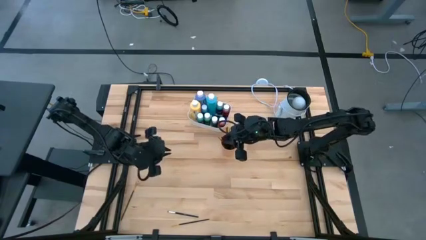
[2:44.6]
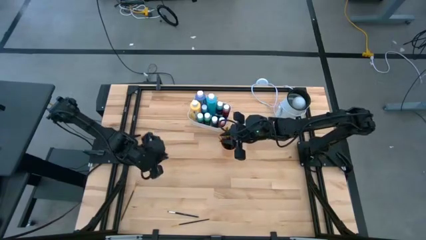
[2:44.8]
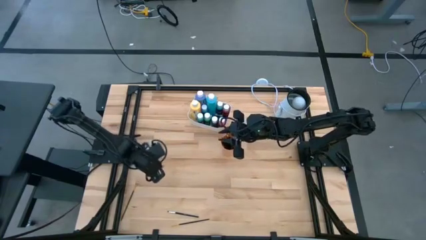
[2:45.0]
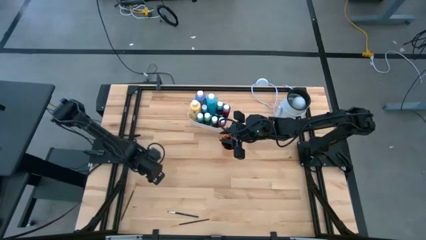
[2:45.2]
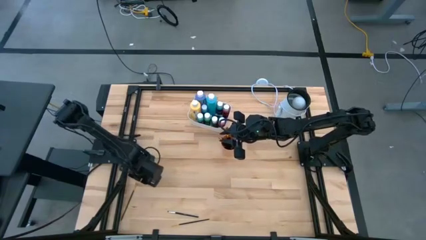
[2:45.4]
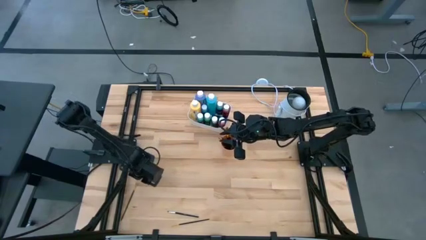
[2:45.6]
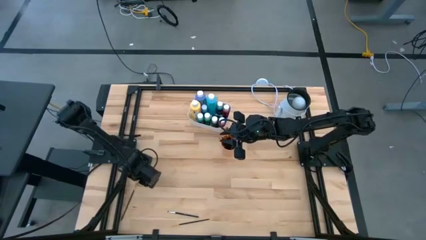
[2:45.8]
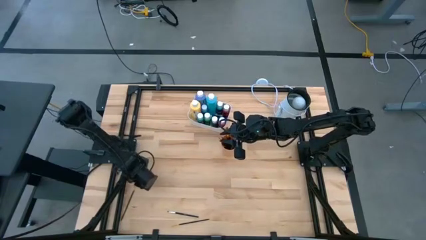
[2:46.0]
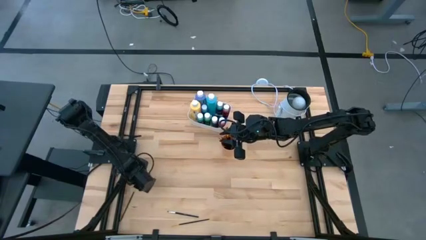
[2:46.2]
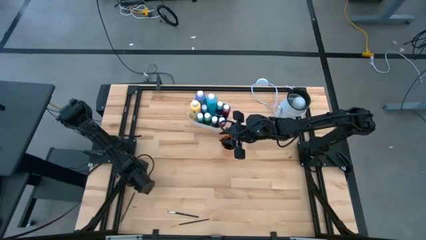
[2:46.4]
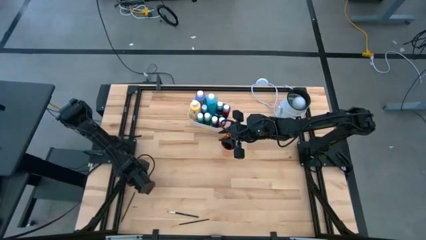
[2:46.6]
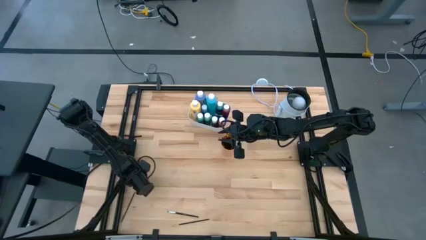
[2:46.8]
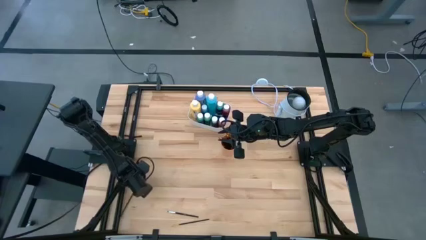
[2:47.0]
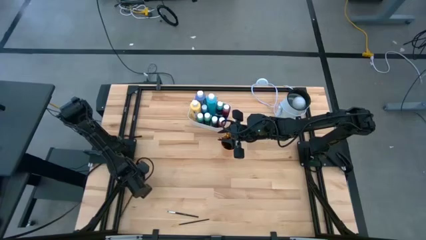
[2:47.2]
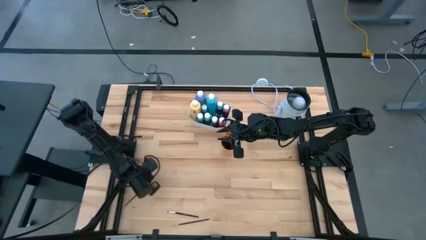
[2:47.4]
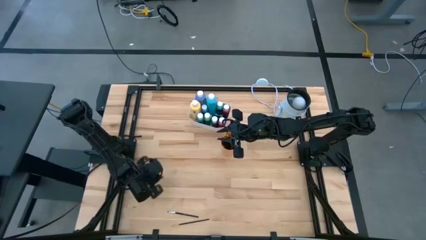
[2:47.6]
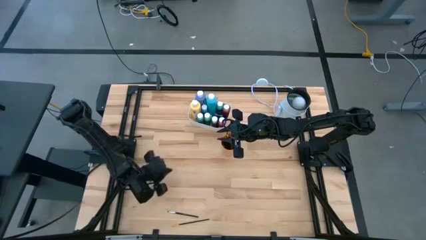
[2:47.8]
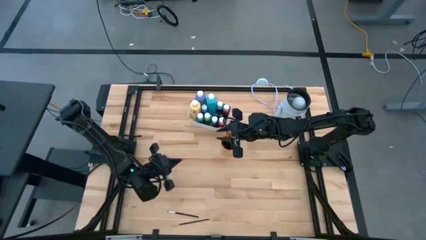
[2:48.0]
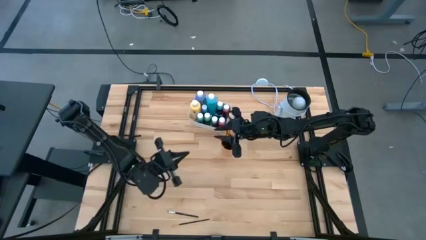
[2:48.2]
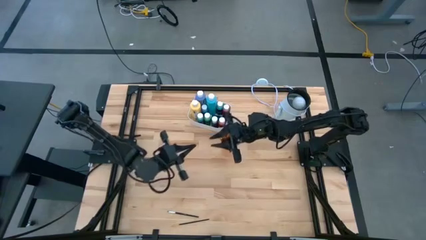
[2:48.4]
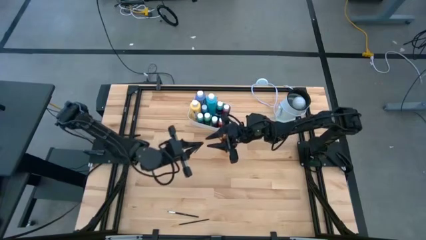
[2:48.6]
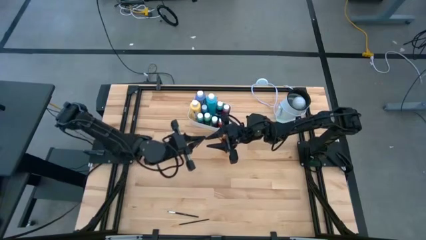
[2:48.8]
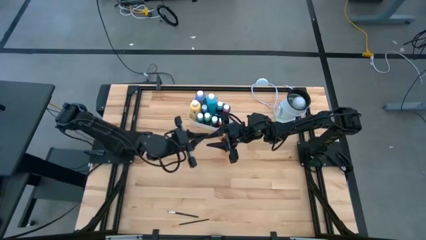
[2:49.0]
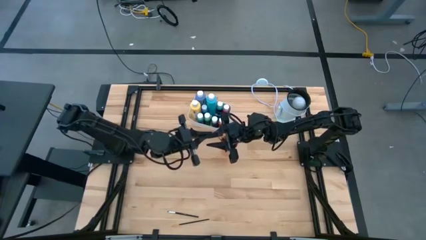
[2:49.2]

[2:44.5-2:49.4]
Task: Pick & Place Paint Supplies
Put the black paint brush into the orange cup

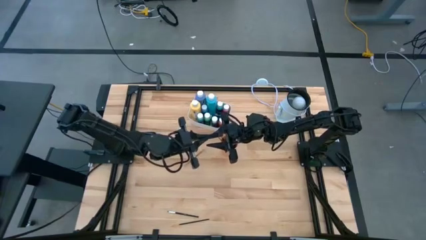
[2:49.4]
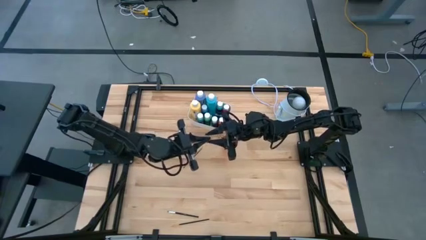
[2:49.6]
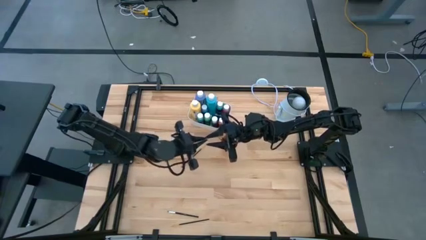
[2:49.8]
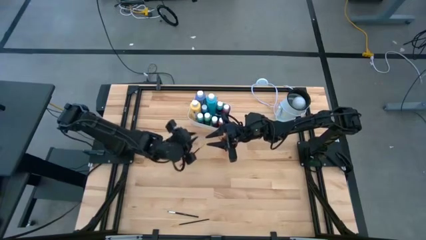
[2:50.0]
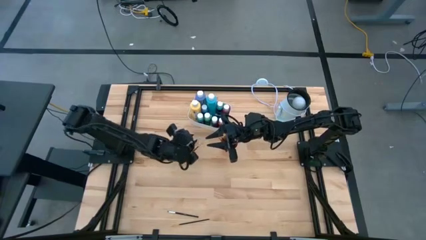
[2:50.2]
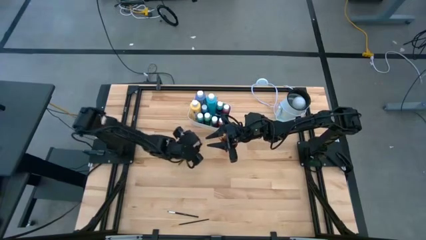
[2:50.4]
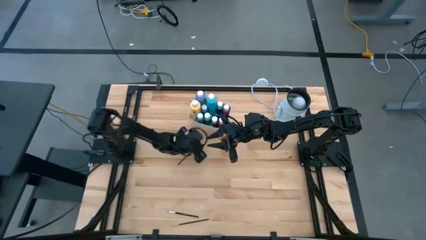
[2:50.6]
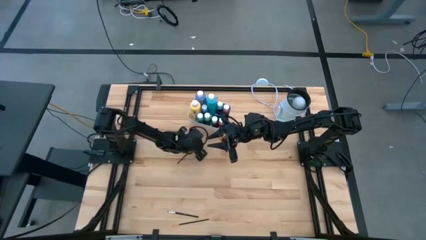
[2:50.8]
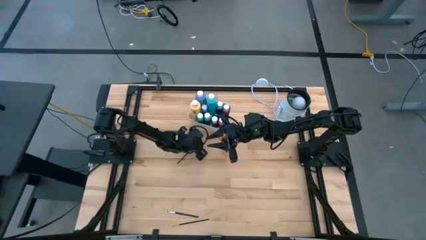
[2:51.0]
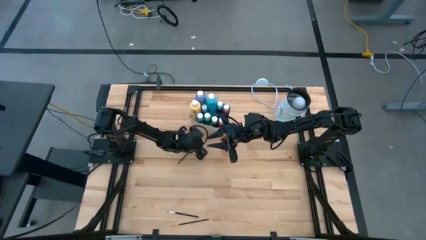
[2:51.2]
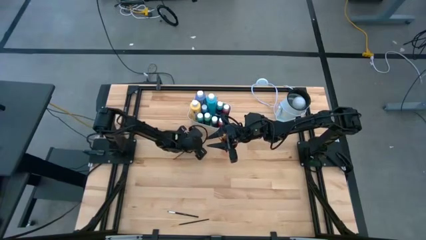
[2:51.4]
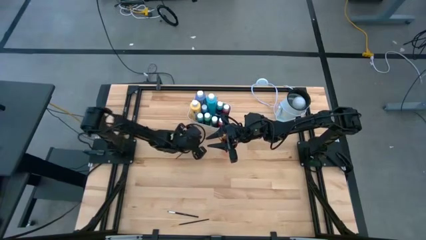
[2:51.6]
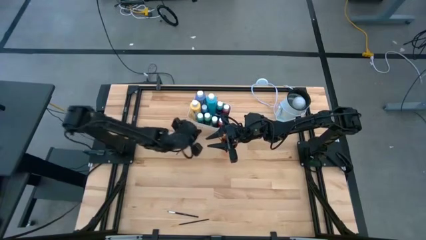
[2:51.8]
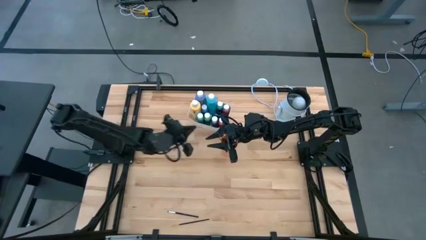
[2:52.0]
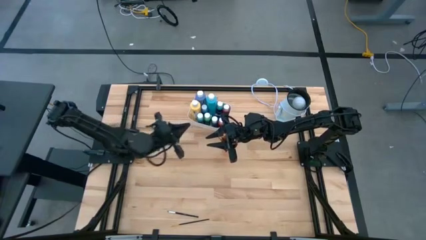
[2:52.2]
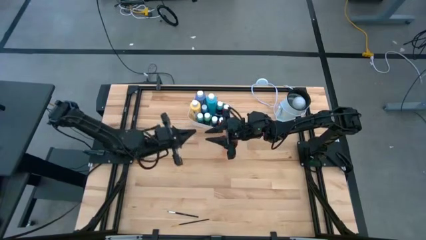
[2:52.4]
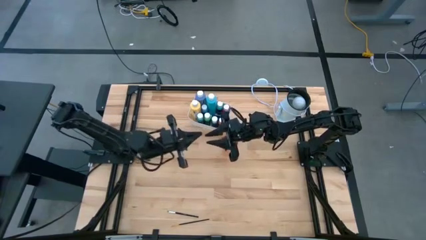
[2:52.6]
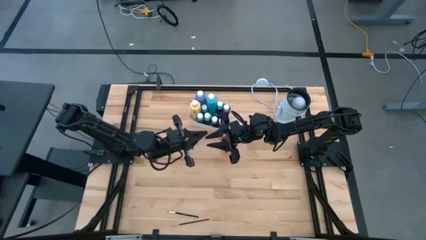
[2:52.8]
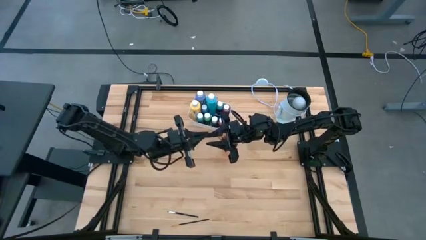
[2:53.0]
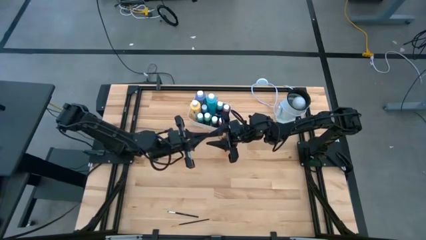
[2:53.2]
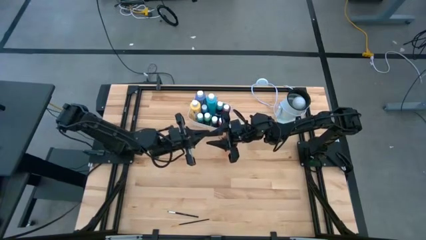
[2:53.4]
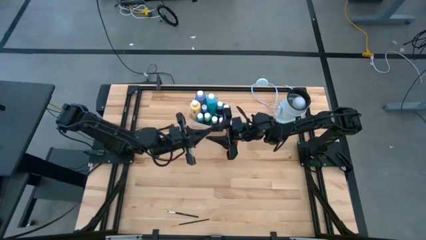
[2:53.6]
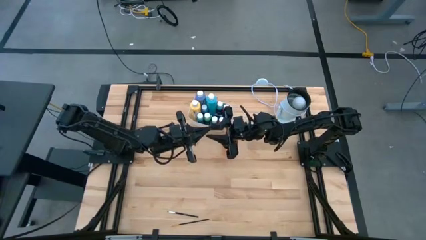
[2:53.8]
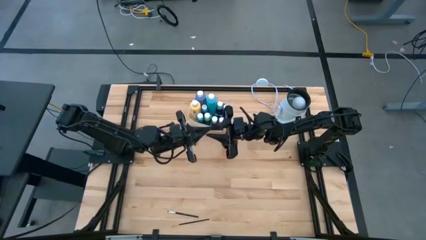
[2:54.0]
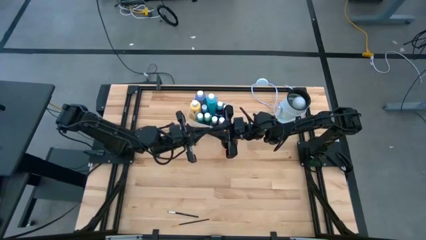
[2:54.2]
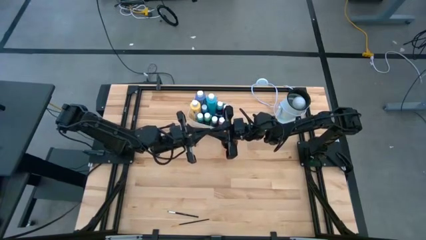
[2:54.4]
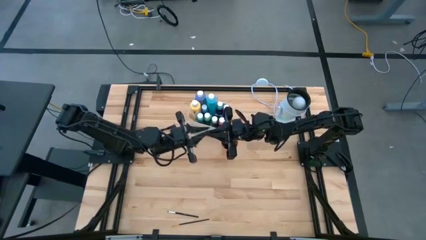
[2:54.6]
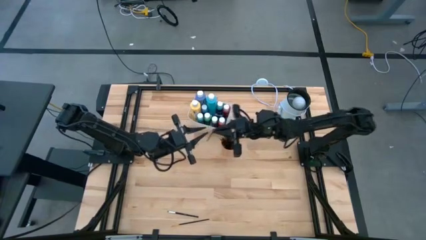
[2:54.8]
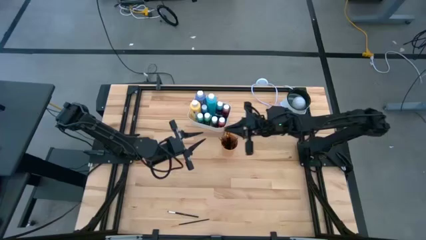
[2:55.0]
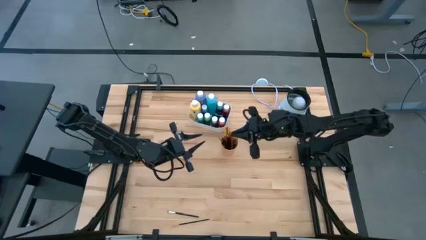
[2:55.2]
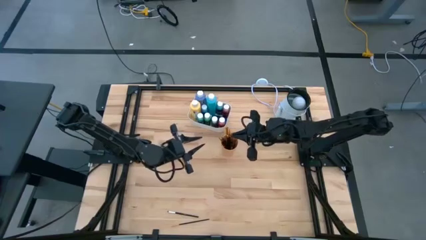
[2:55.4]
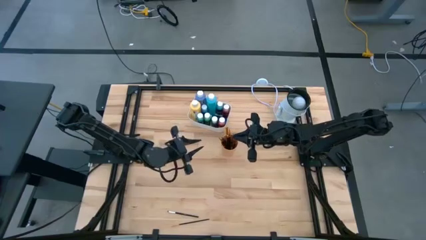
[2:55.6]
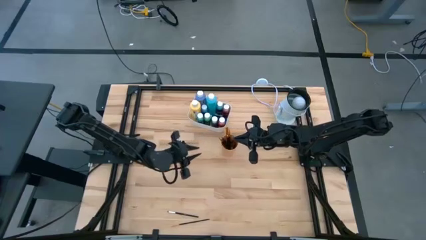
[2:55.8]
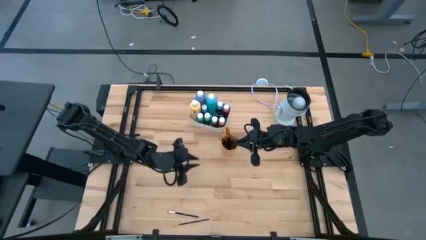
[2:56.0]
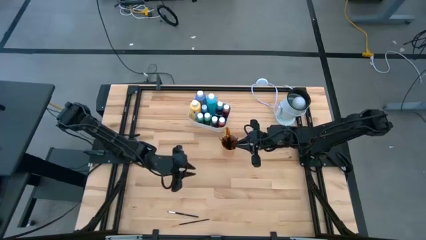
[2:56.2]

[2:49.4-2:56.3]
Put the black paint brush into the orange cup

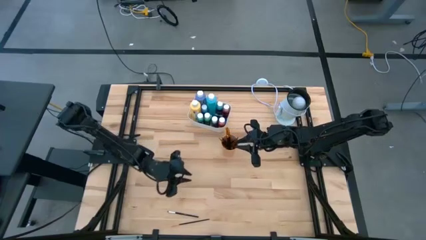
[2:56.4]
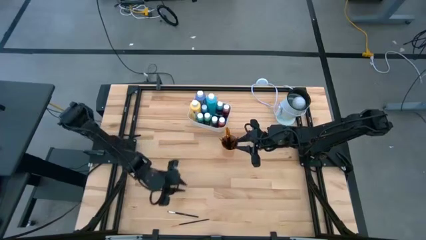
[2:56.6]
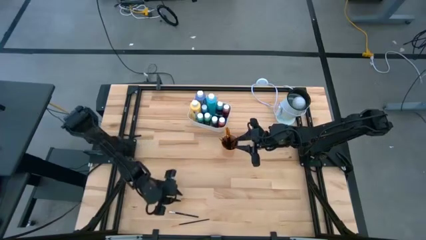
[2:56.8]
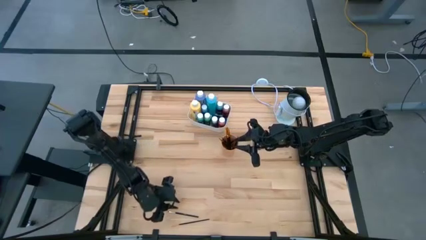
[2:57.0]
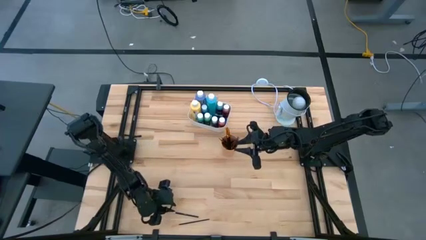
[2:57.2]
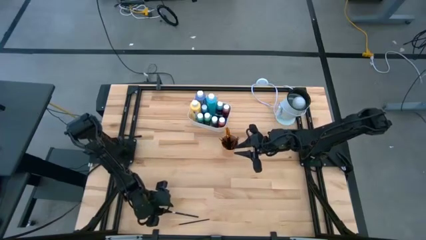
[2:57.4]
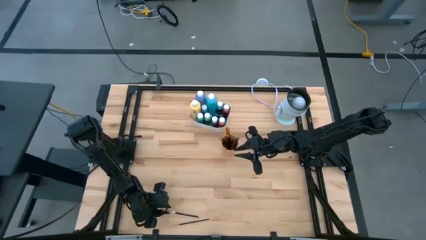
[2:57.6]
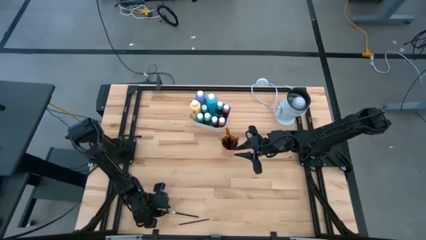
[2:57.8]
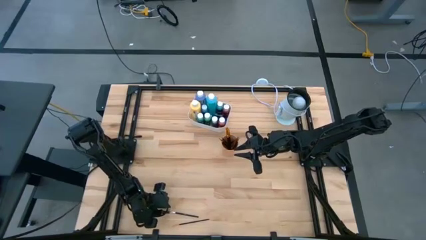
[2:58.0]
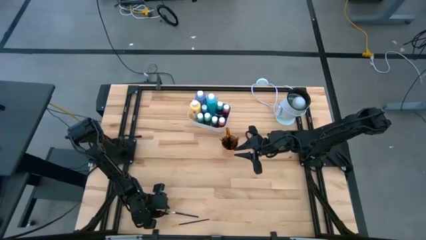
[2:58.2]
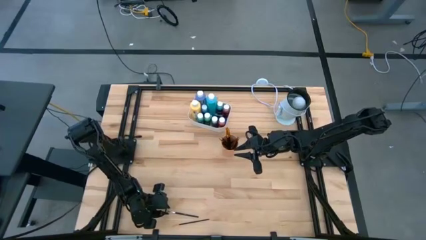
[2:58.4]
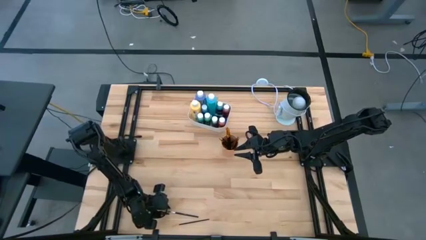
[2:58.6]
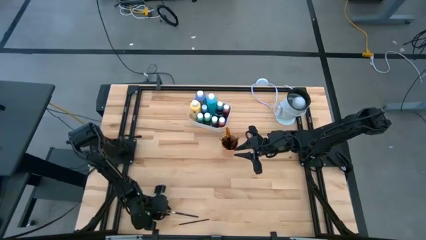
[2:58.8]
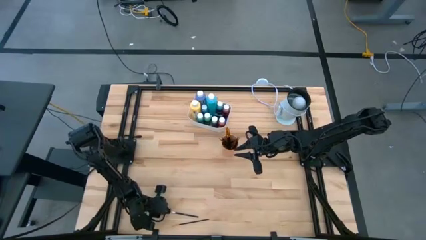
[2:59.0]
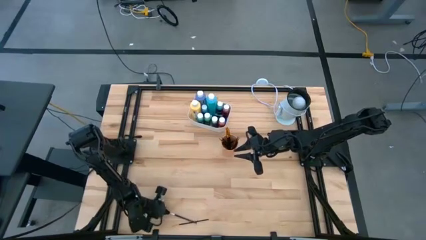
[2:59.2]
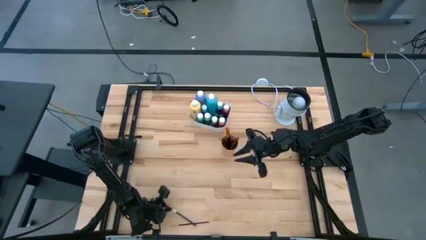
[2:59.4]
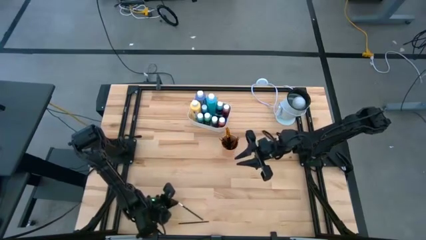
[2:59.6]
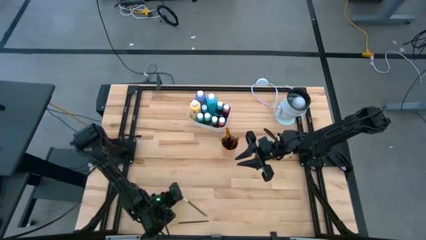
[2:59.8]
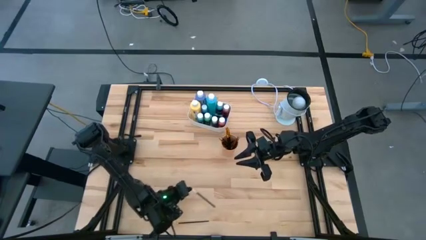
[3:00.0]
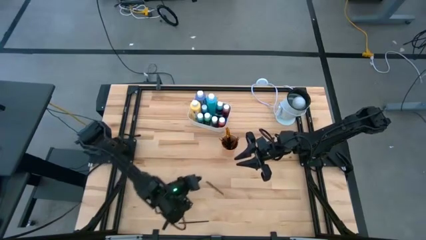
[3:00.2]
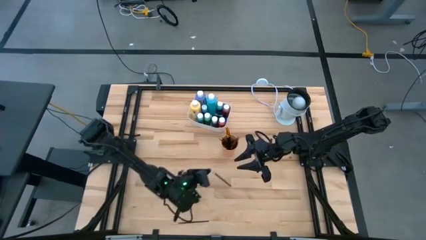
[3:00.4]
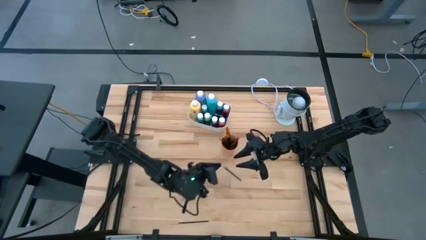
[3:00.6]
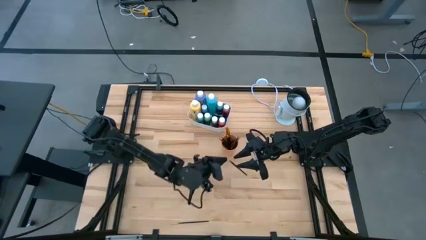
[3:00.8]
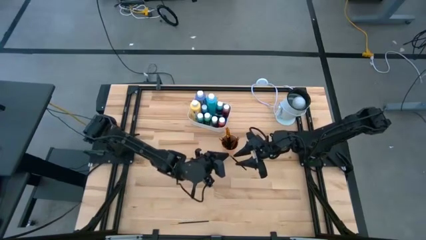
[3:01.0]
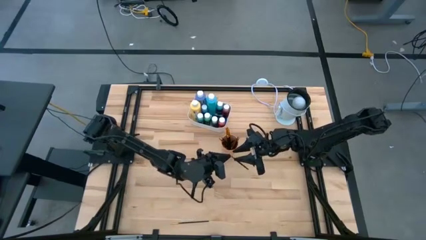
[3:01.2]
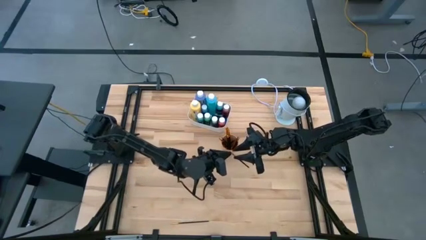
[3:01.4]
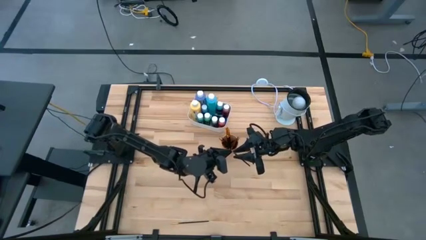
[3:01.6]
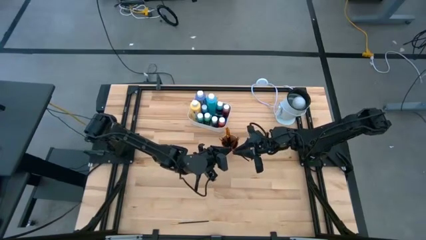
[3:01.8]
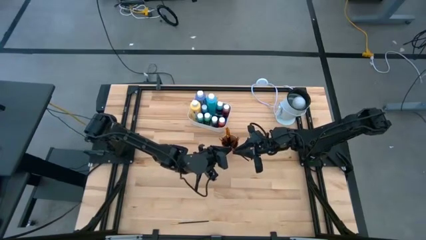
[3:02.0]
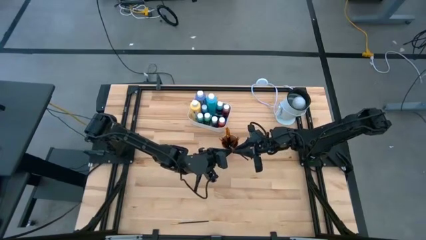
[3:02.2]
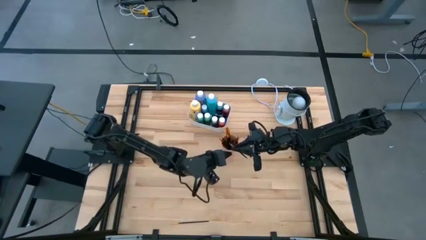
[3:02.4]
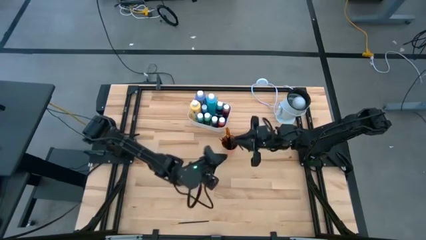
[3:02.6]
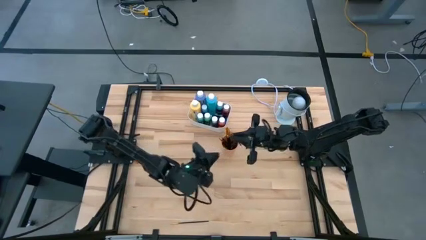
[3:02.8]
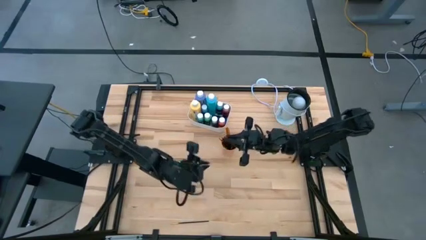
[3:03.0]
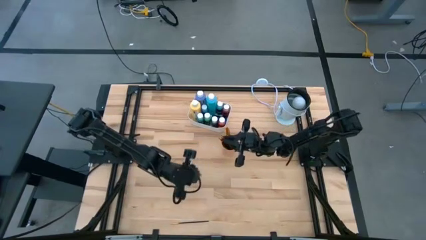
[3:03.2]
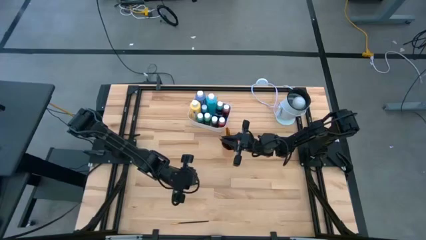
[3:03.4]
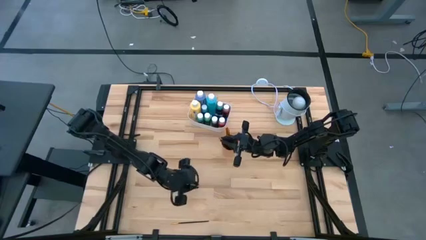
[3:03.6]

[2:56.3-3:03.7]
Put the black paint brush into the orange cup
